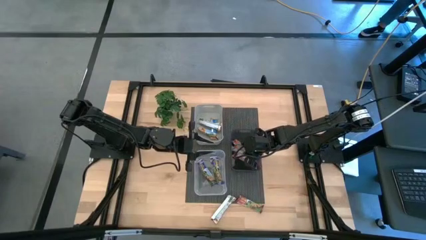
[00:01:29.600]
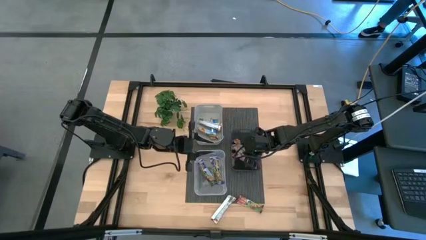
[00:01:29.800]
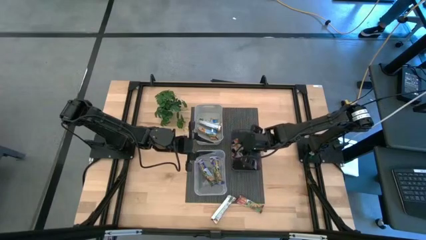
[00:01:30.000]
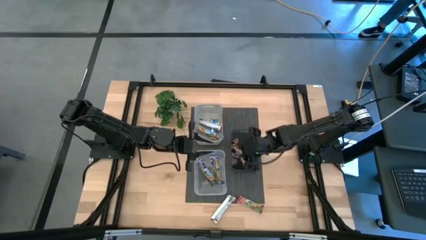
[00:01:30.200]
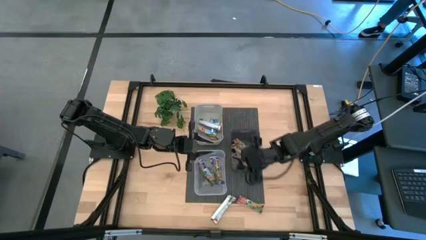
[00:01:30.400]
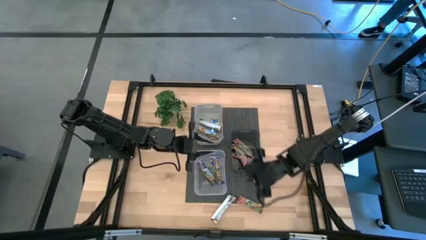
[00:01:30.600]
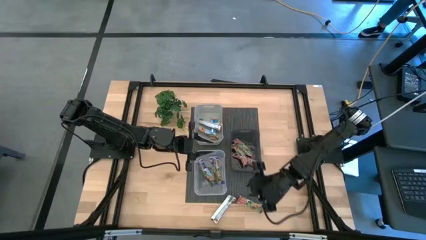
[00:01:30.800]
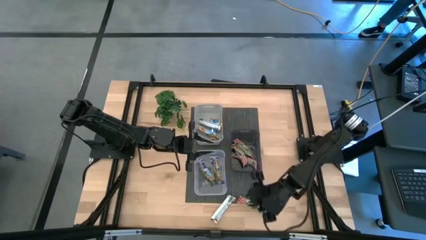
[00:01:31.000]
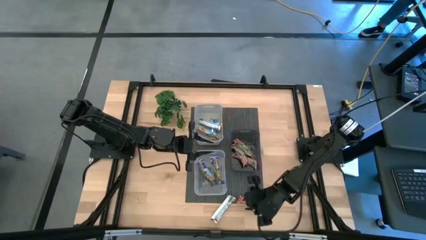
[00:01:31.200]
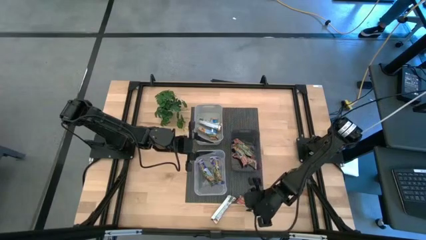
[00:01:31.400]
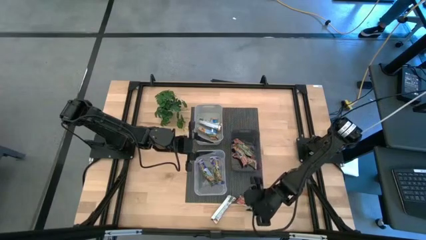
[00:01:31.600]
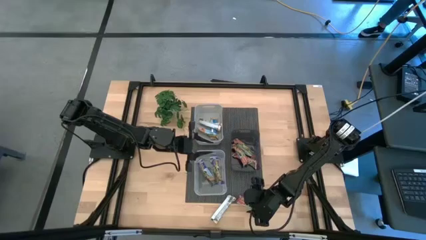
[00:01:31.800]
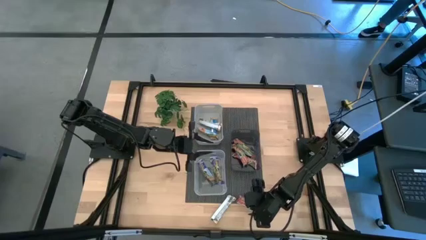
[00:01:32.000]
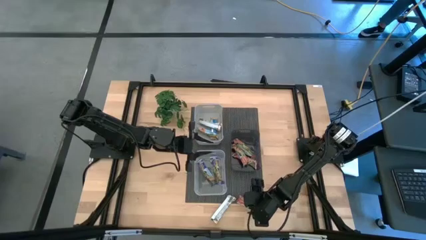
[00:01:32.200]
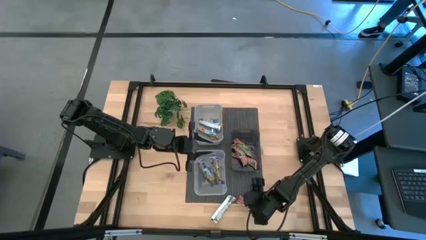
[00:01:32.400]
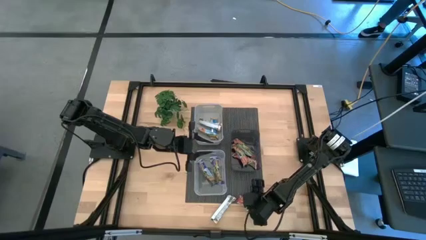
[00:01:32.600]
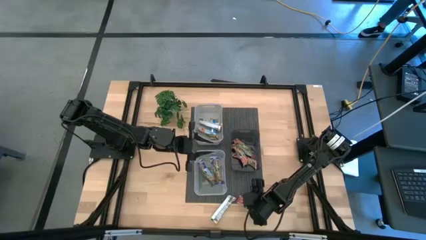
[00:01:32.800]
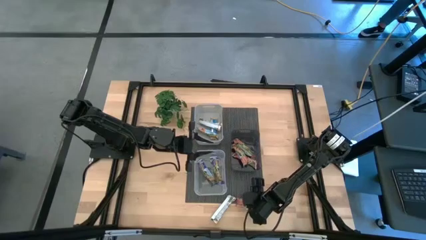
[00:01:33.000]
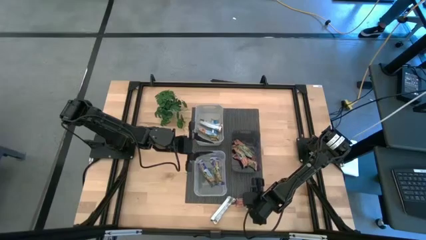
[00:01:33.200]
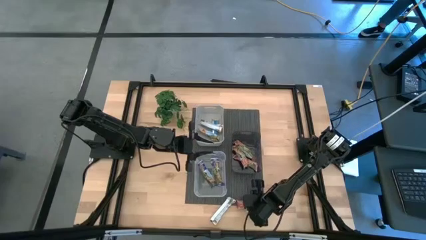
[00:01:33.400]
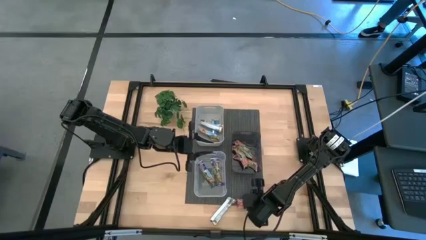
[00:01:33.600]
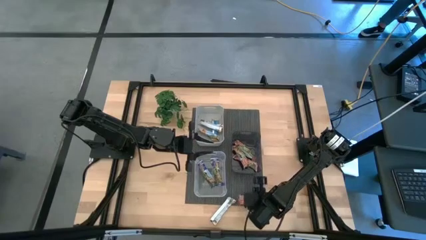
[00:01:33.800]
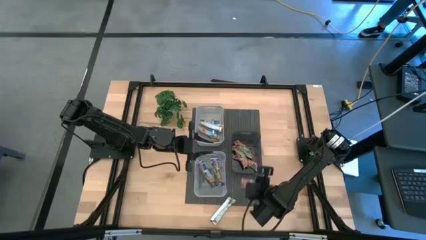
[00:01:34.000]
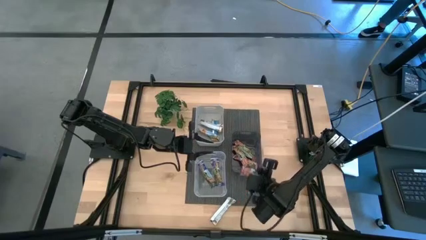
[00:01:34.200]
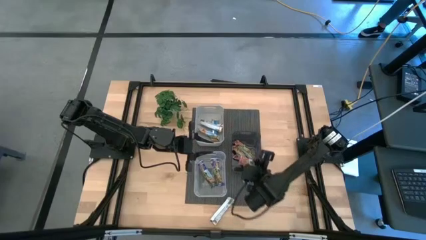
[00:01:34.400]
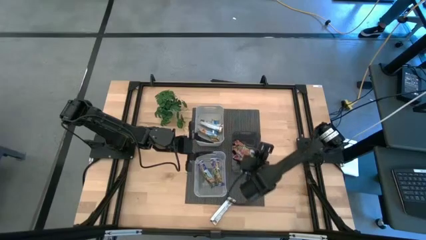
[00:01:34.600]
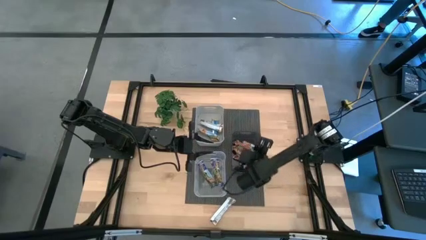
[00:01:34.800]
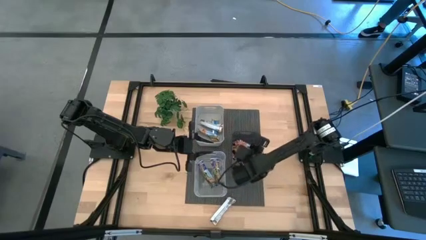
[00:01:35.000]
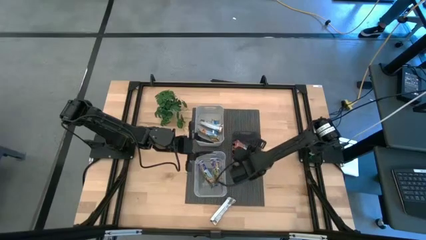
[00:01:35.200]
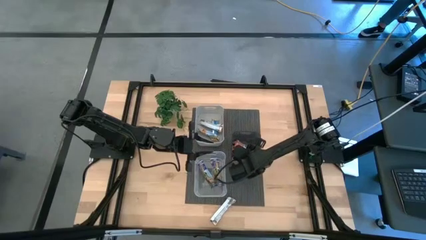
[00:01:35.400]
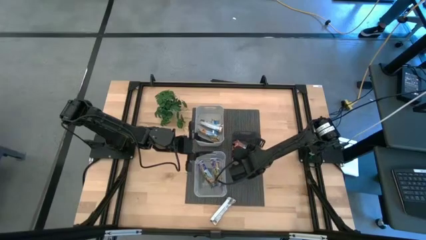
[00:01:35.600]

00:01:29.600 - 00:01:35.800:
Task: Pick and place Granola Bars by type
Put the red granola bar into the black bin

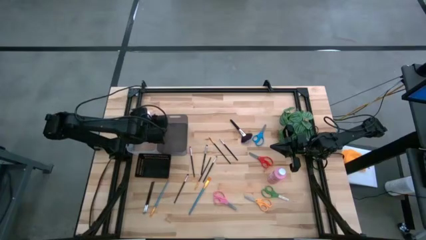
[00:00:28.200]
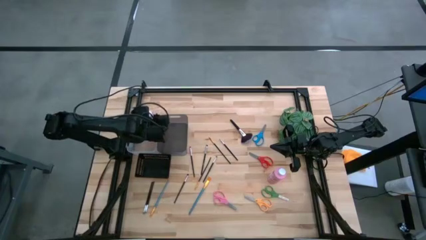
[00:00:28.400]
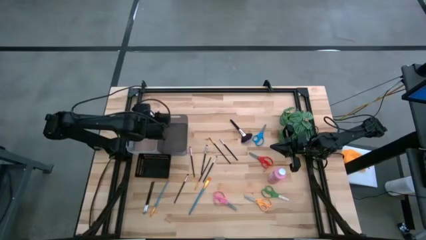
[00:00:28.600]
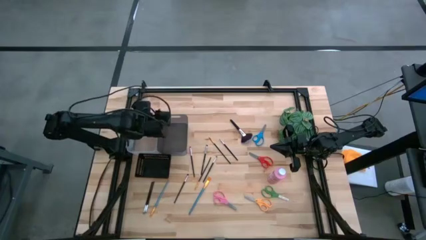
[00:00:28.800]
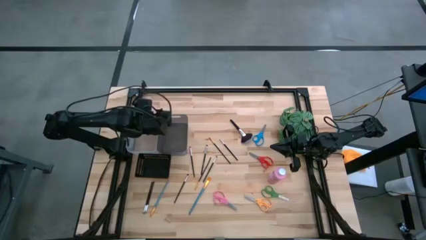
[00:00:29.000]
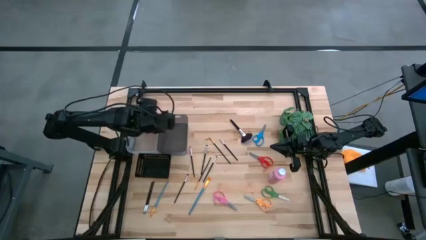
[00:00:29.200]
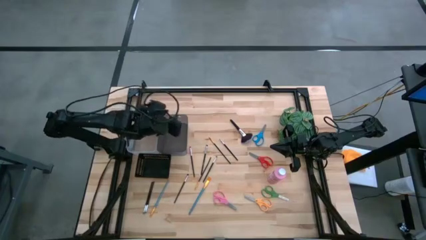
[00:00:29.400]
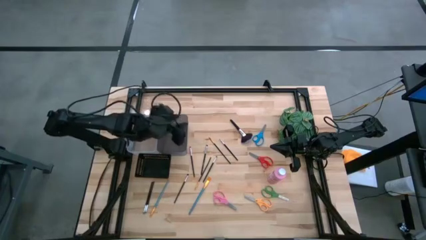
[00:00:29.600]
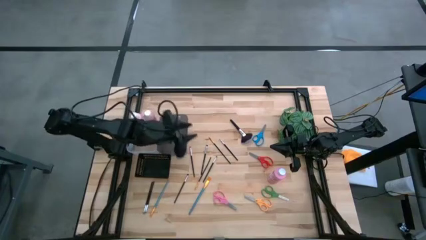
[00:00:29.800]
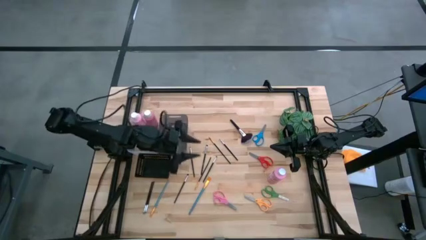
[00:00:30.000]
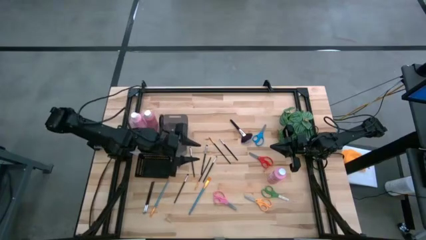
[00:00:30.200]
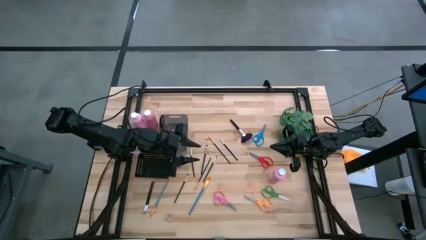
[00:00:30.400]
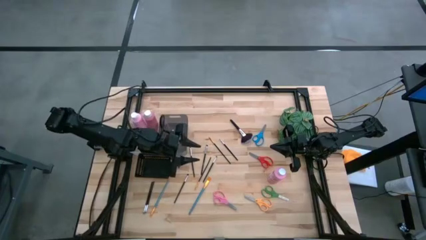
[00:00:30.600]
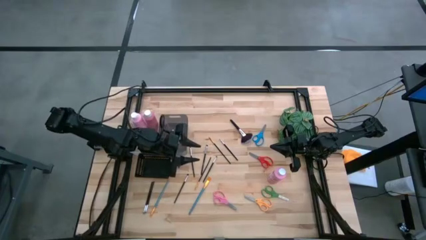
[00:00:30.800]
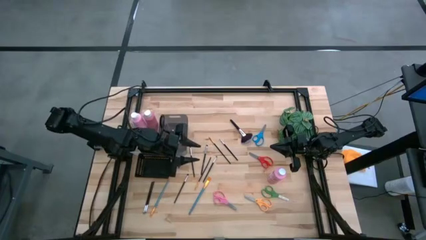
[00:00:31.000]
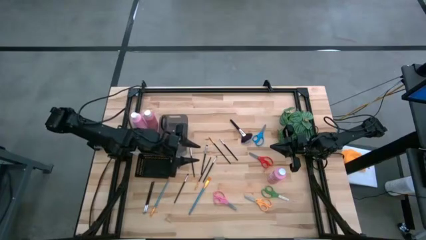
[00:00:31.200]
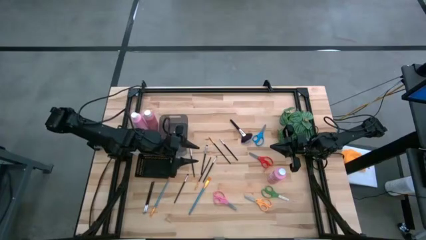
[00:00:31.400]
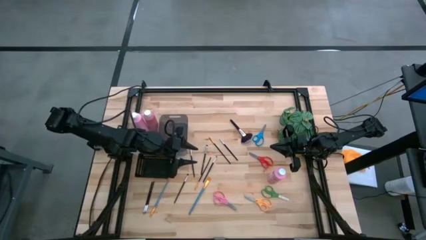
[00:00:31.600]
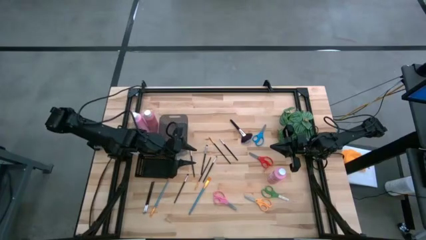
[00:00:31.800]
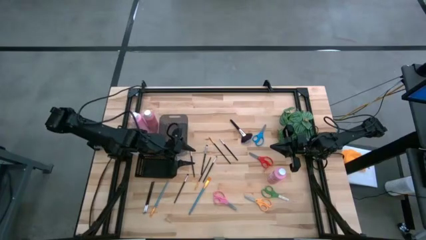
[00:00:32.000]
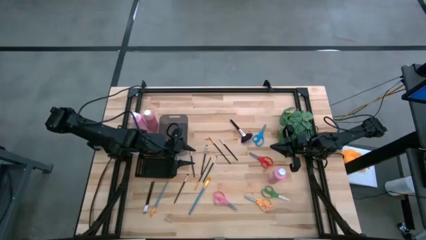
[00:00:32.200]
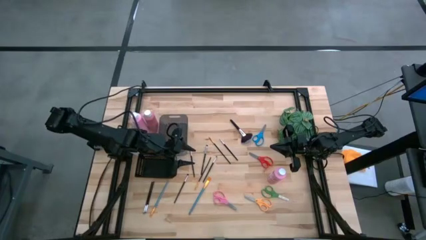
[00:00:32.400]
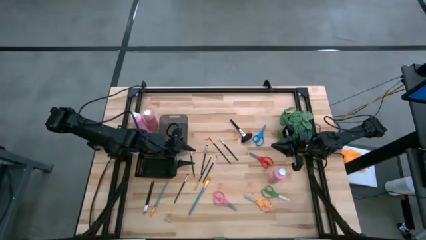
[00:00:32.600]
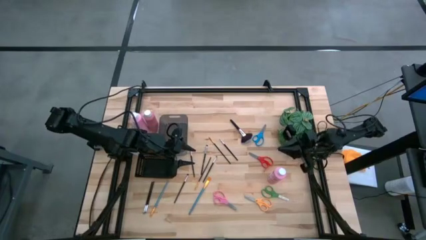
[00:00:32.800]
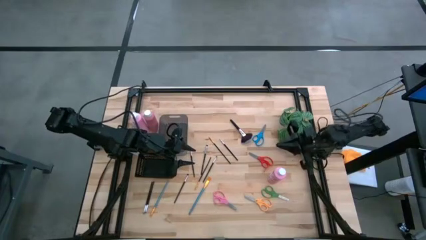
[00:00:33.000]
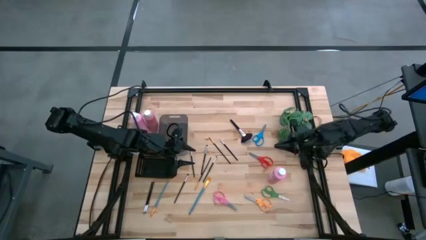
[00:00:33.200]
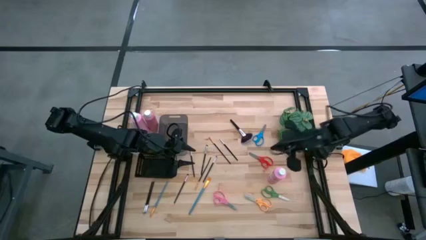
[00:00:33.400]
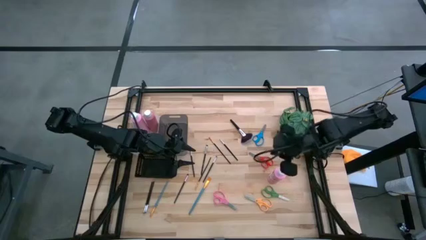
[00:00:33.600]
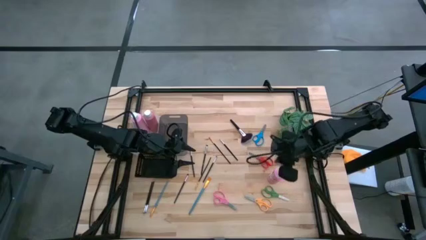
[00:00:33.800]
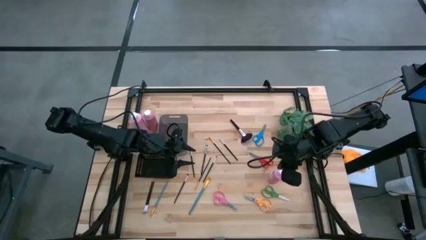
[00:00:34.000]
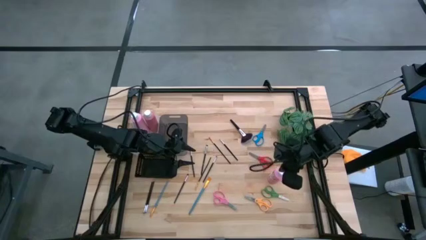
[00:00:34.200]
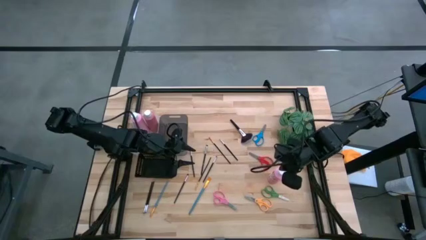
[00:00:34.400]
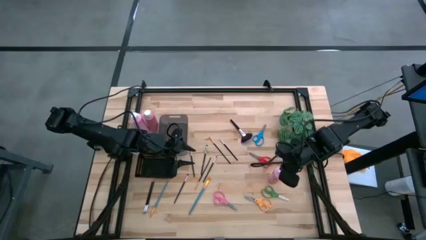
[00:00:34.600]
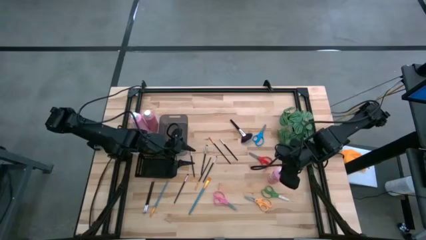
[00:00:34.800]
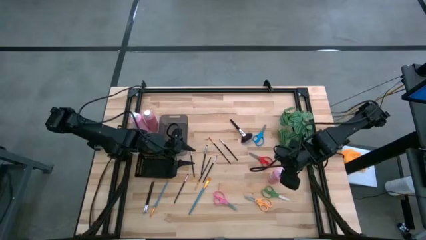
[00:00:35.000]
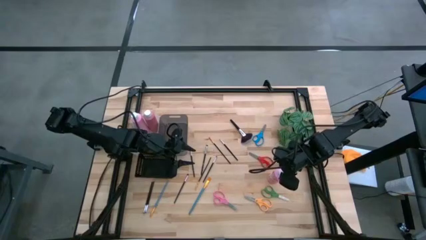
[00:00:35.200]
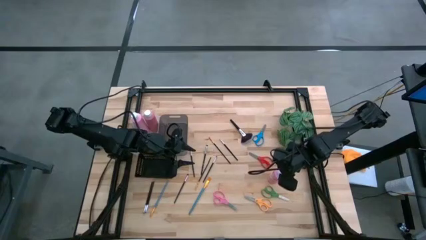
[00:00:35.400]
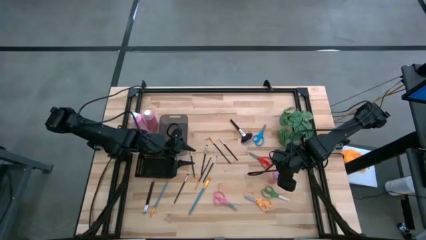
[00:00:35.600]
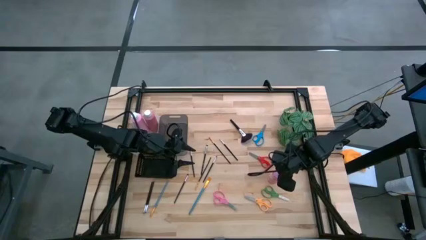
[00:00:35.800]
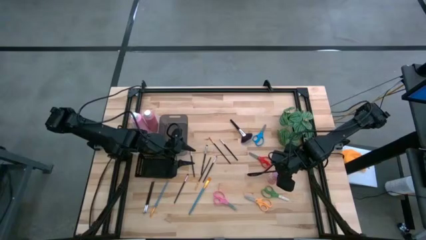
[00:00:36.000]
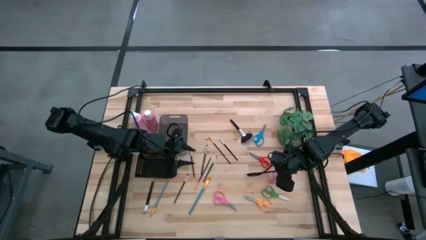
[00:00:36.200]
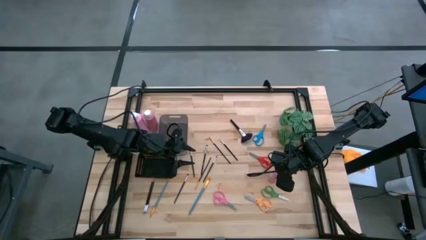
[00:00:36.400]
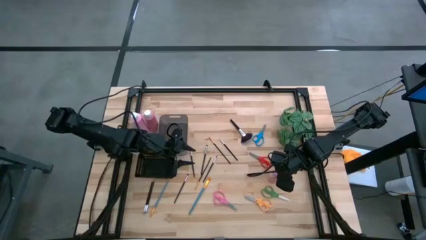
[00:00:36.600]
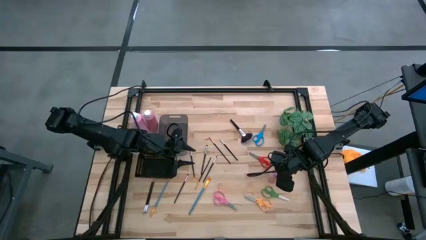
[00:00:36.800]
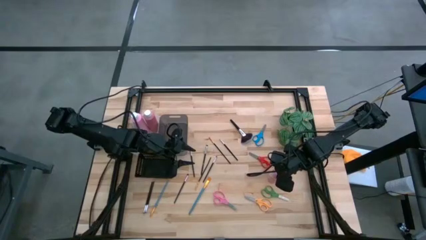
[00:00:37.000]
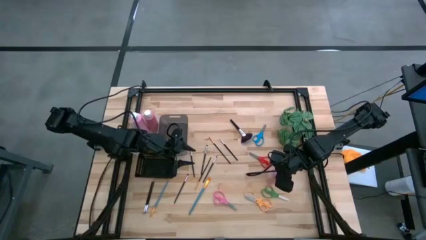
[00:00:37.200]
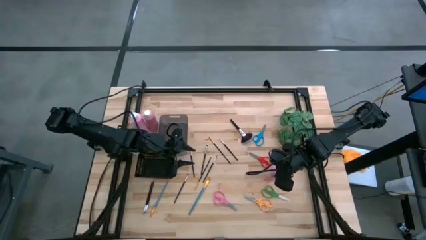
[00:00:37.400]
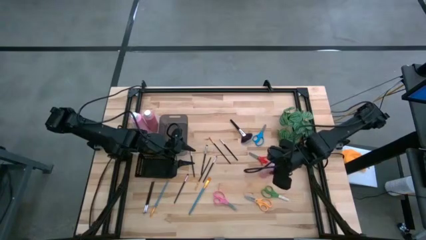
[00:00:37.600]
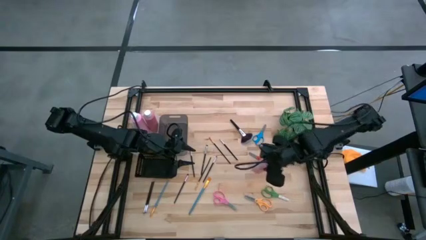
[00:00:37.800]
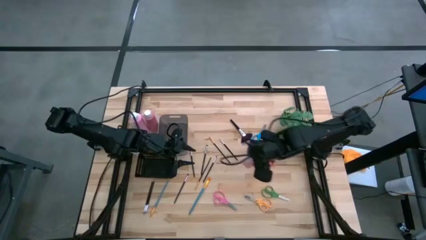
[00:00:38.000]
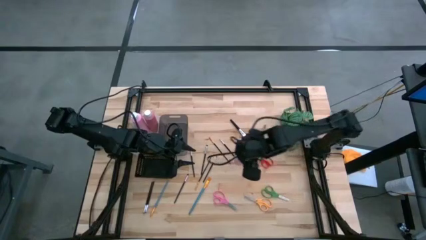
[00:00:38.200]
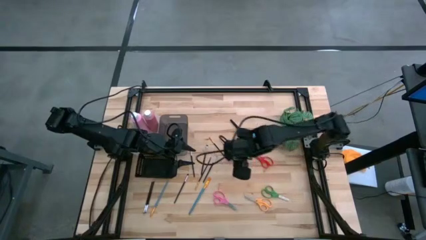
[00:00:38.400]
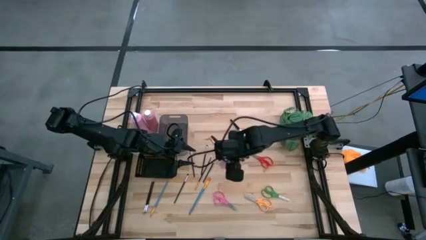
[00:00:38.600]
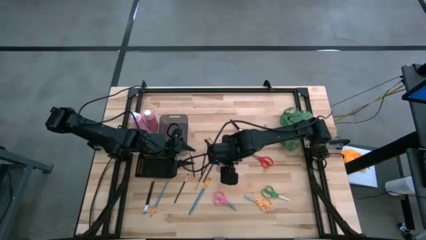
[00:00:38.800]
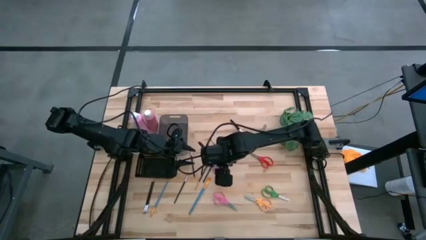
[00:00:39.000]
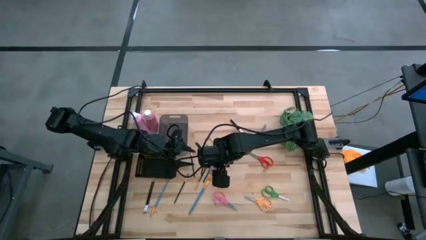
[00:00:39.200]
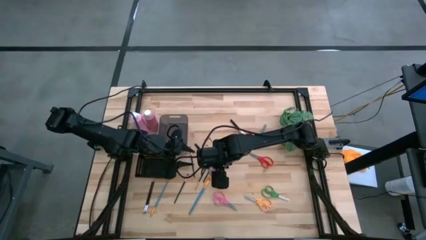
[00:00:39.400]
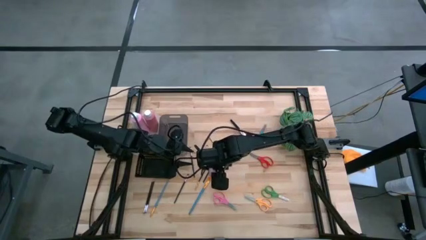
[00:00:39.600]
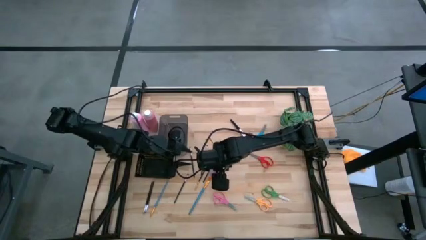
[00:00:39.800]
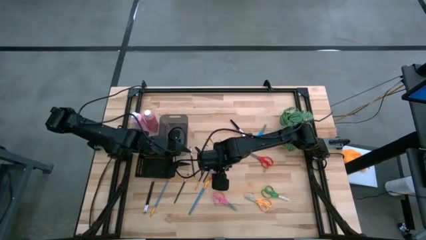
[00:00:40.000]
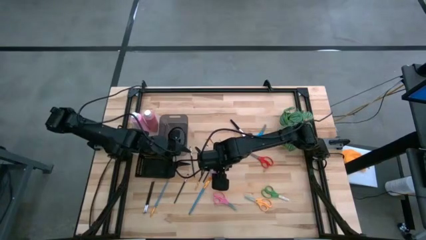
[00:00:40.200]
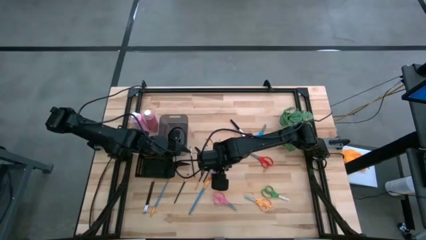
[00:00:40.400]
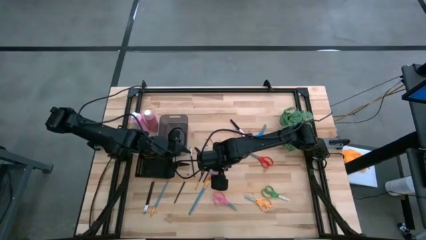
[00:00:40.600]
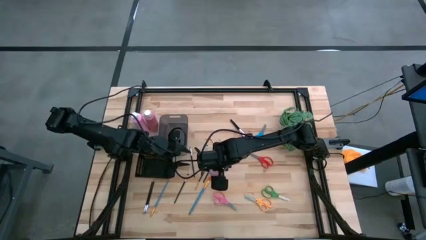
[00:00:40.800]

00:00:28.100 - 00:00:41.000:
Task: Pick & Place Paint Supplies
Put the right light pink bottle into the white bin
